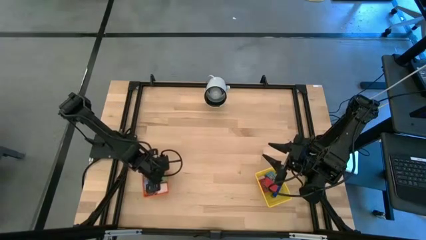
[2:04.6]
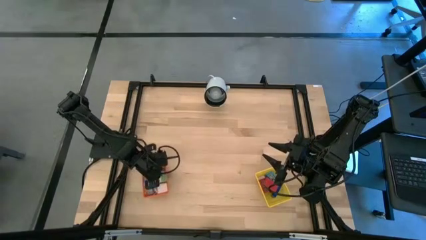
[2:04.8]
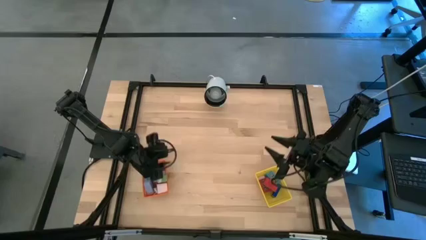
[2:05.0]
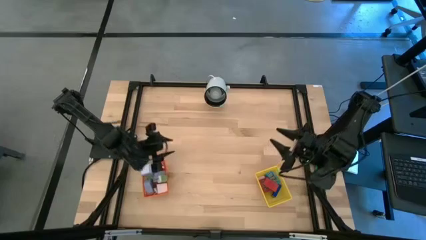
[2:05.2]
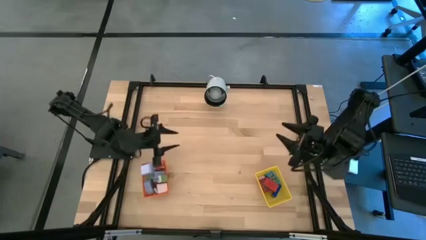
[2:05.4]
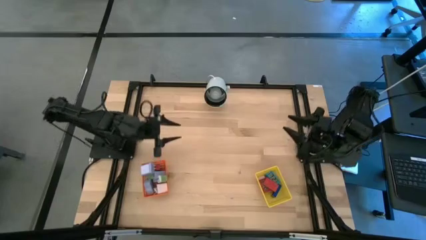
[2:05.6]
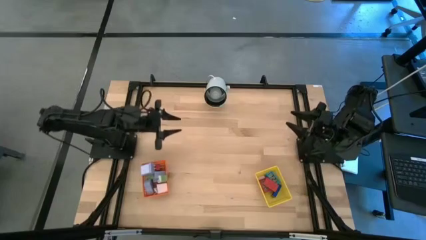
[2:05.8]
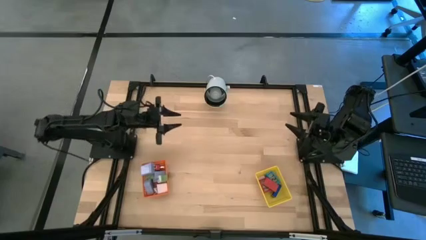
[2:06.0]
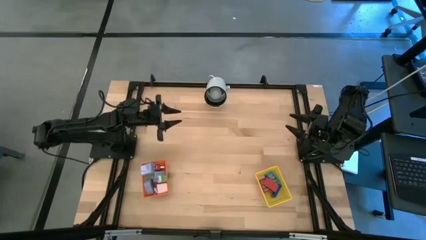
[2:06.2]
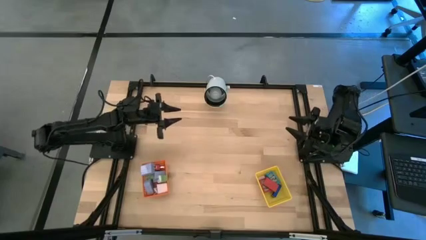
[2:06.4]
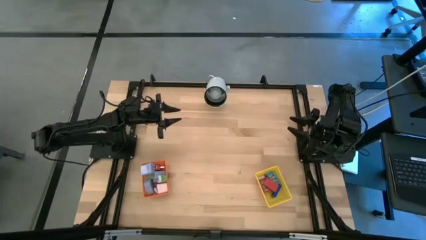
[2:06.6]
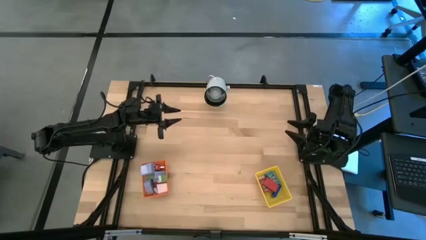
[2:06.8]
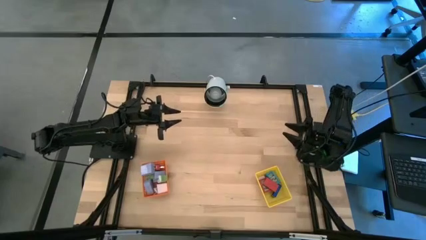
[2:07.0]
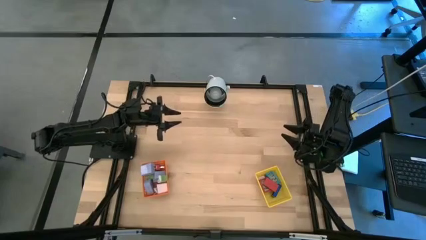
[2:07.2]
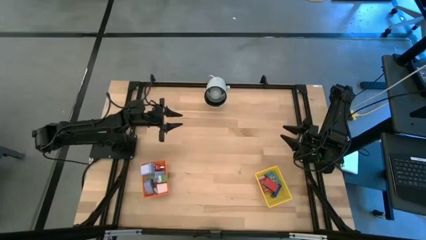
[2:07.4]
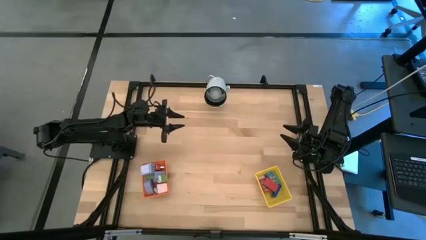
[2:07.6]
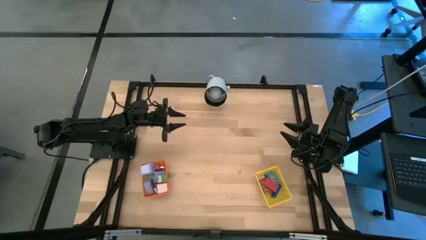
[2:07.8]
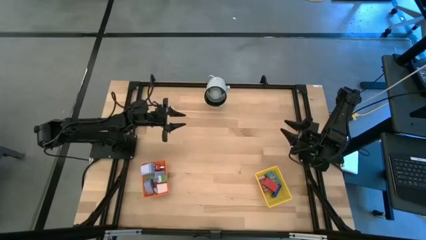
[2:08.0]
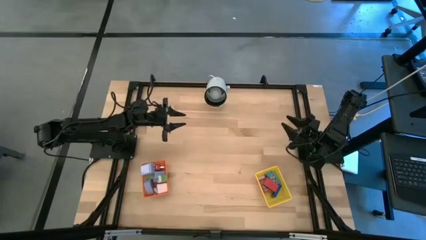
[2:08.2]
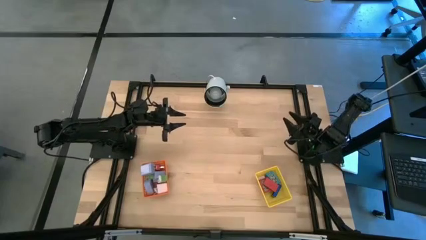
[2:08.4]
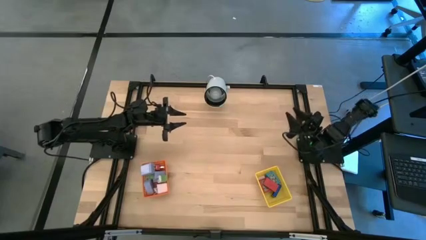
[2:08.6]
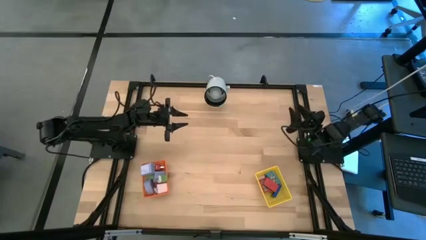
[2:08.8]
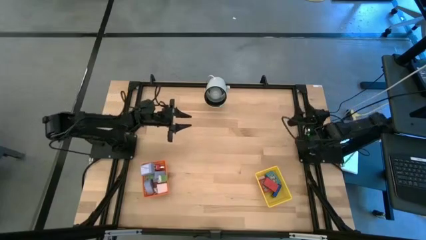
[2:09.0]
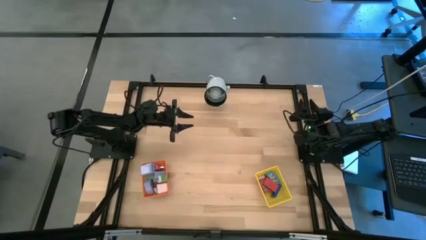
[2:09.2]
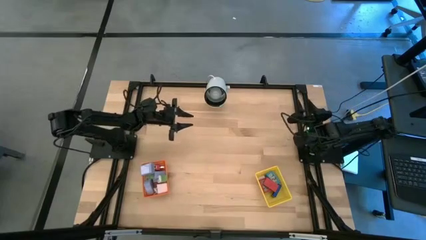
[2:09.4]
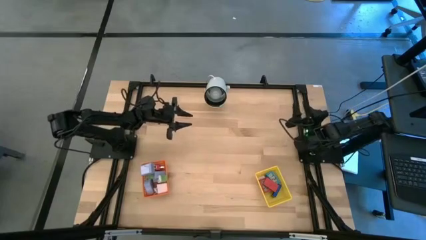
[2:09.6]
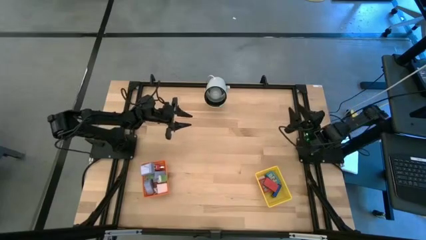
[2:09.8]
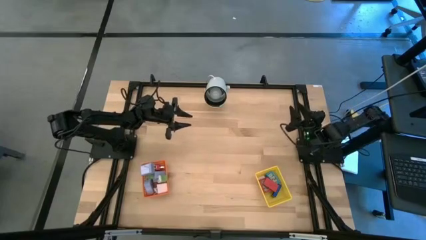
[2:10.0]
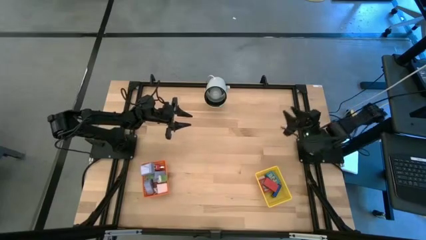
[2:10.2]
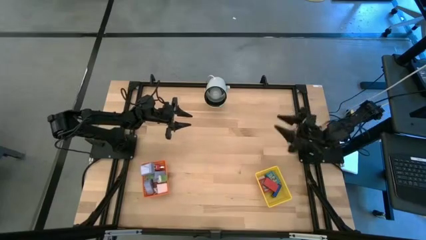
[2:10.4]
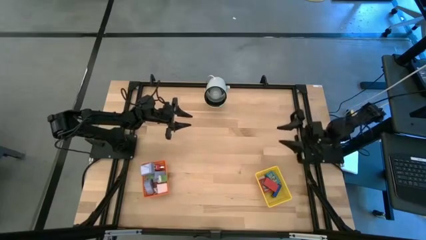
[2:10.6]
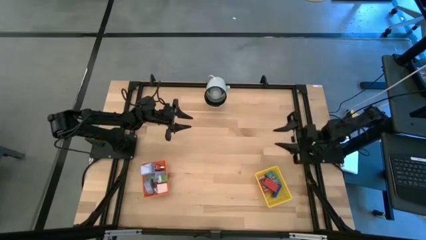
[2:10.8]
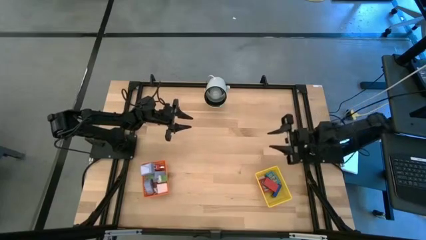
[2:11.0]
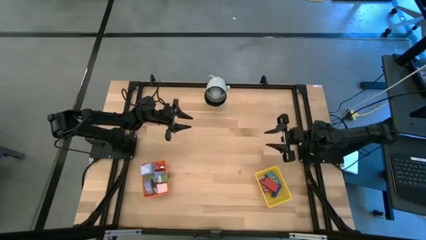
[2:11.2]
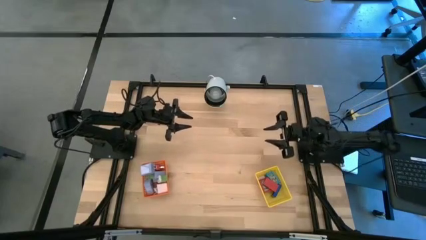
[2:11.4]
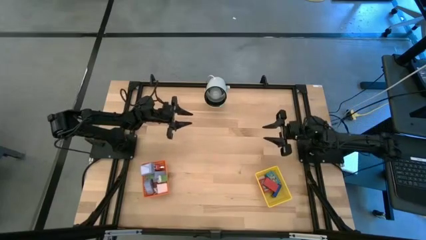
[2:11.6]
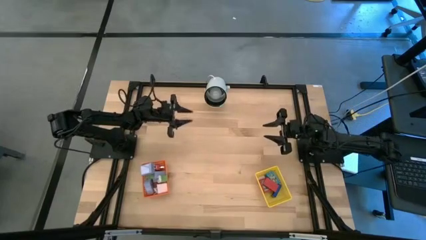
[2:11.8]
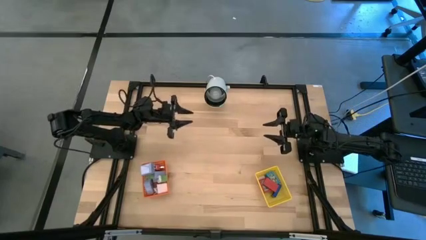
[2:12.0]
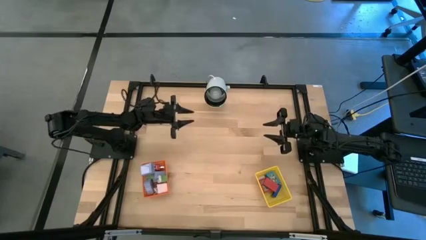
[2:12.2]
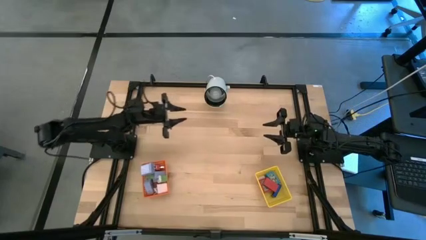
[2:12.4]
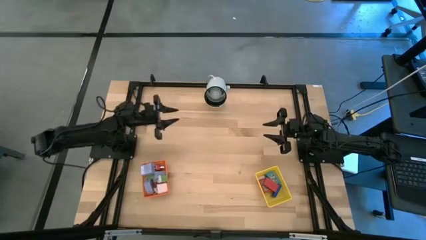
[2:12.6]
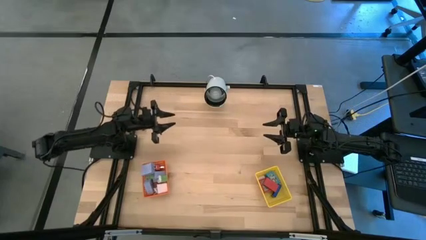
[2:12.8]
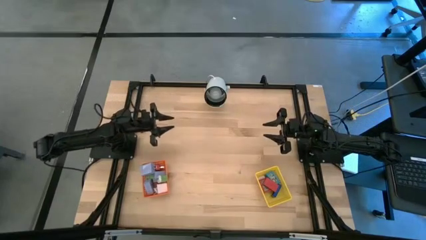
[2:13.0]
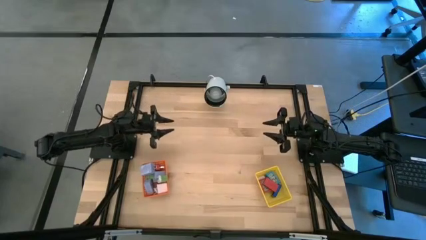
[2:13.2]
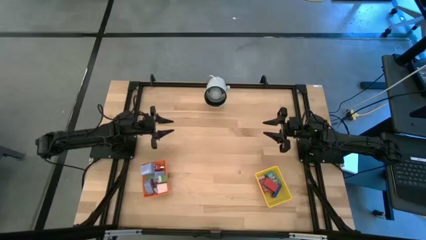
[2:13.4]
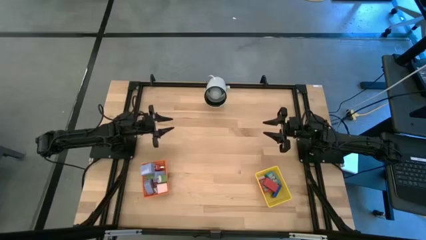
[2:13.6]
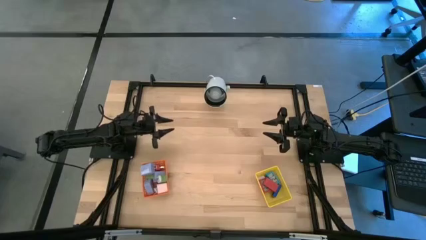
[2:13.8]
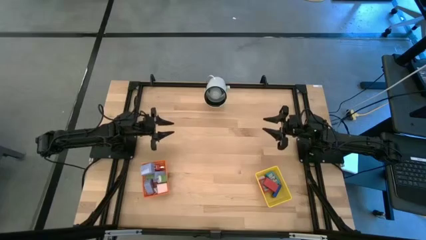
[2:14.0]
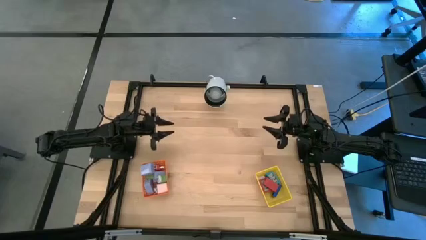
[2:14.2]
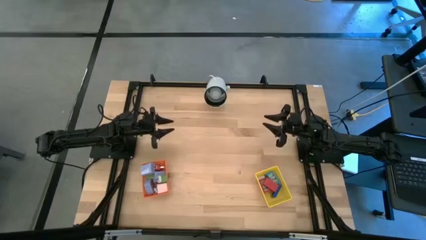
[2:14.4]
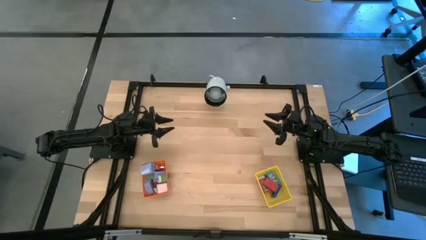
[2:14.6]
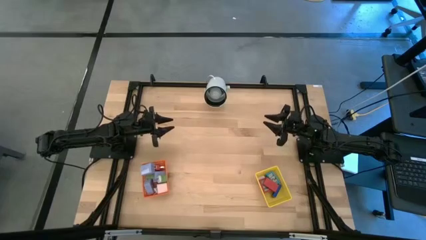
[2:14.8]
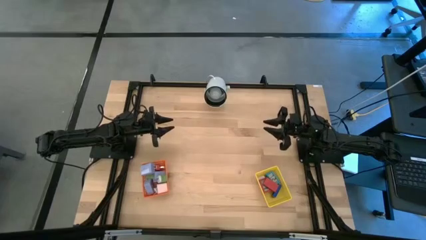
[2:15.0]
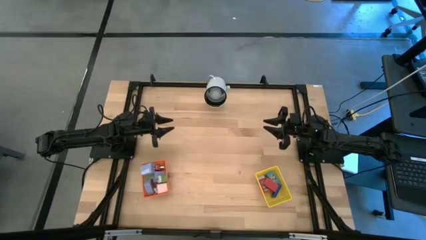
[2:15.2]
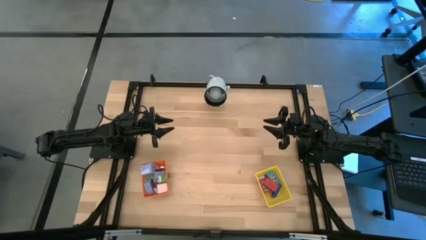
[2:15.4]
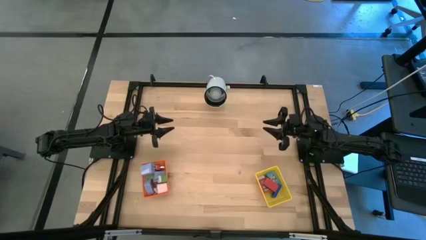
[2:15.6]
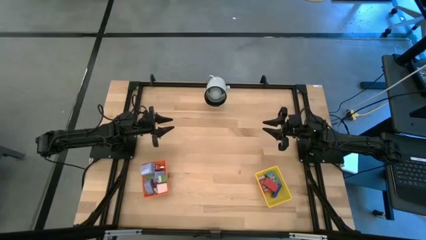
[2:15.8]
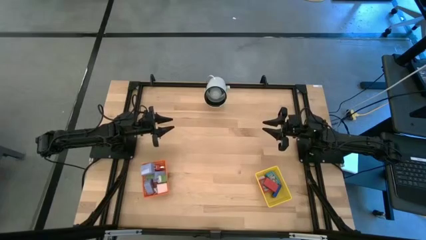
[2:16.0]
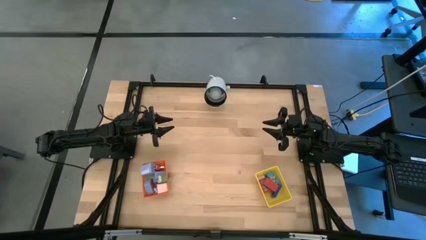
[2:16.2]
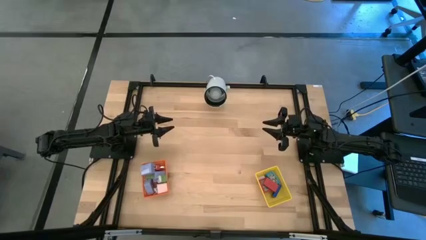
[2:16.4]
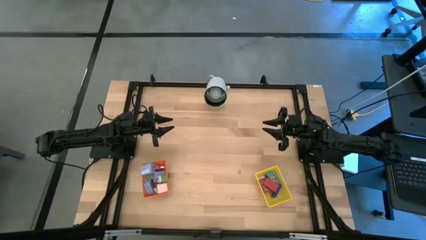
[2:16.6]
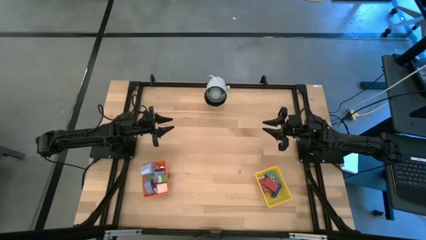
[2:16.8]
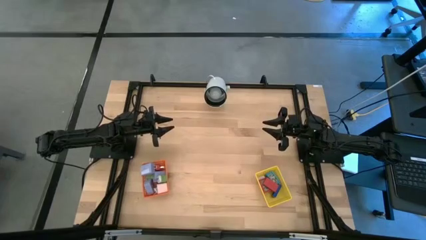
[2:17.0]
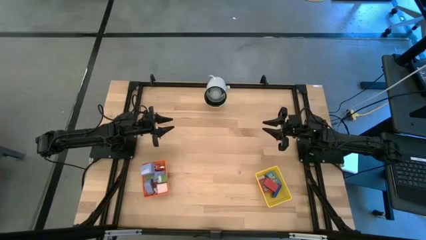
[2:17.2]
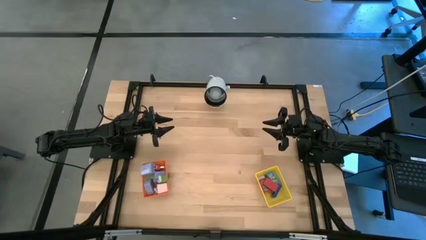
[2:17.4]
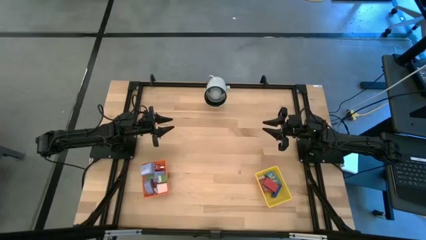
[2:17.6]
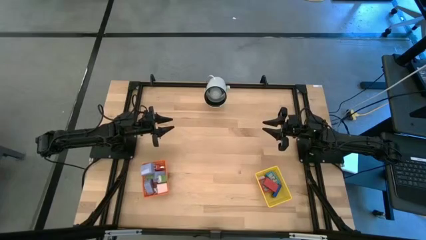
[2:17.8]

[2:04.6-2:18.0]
Task: Pick & Place Office items
Return to Home Position

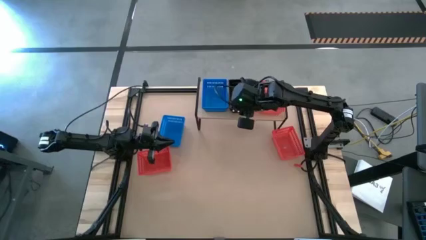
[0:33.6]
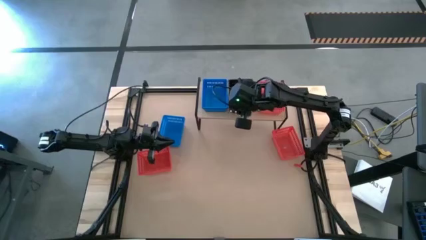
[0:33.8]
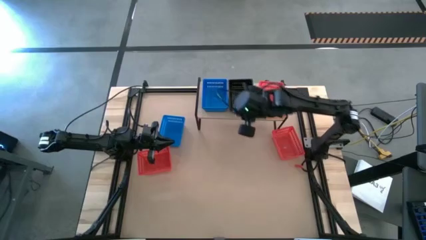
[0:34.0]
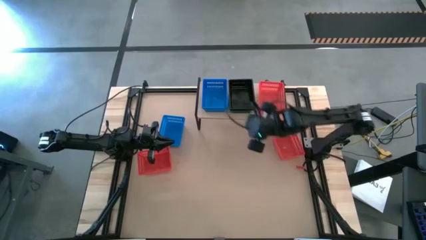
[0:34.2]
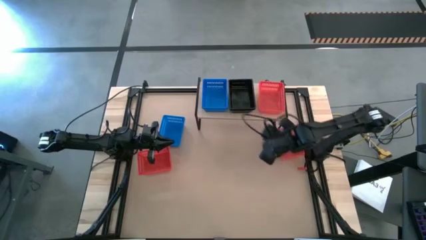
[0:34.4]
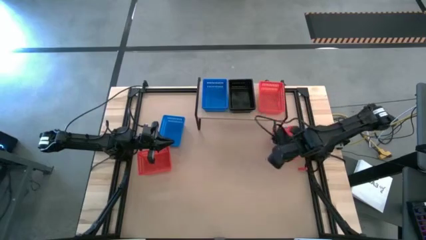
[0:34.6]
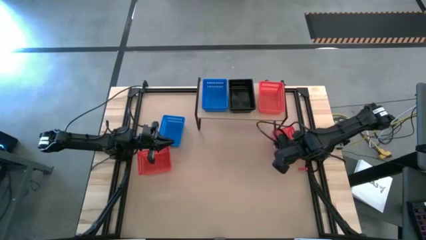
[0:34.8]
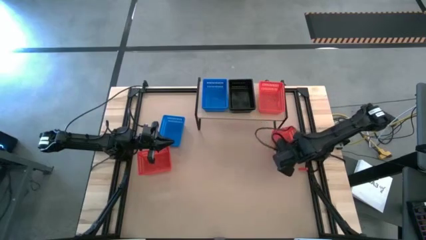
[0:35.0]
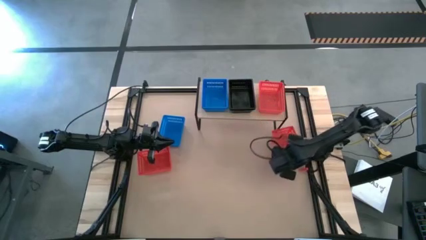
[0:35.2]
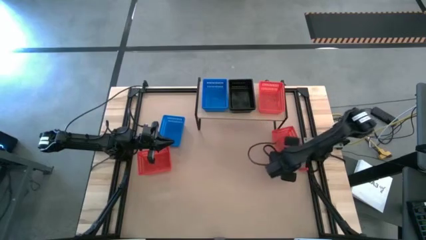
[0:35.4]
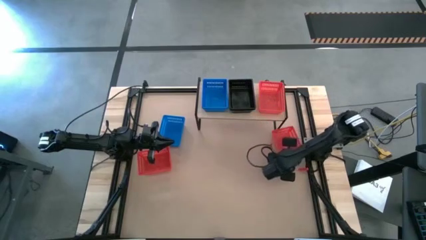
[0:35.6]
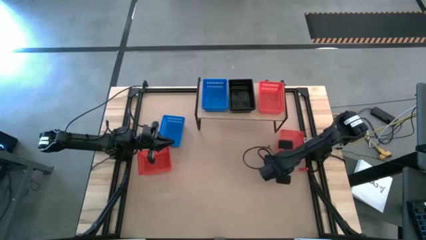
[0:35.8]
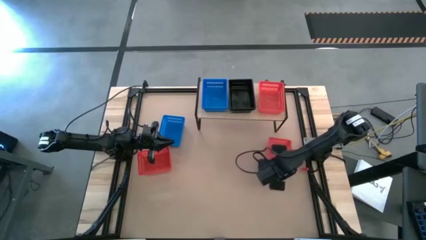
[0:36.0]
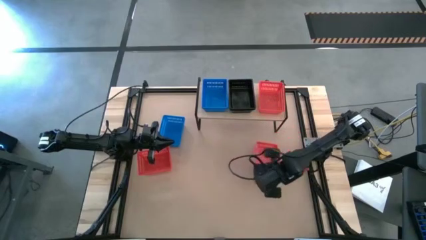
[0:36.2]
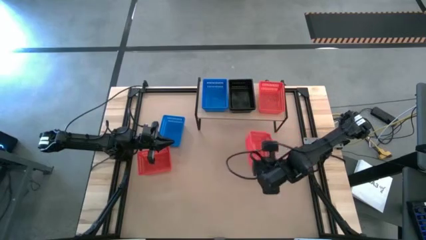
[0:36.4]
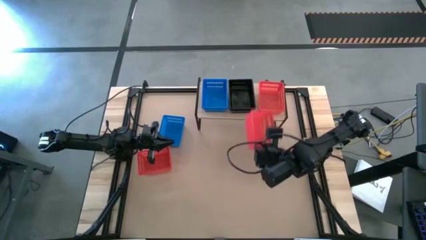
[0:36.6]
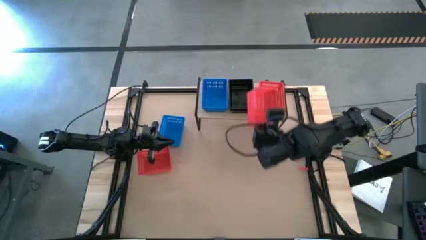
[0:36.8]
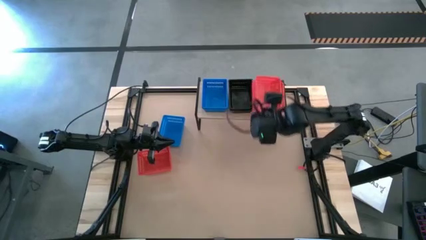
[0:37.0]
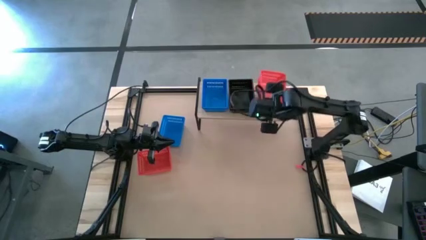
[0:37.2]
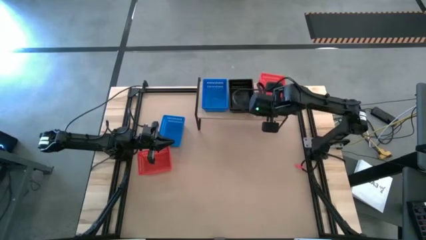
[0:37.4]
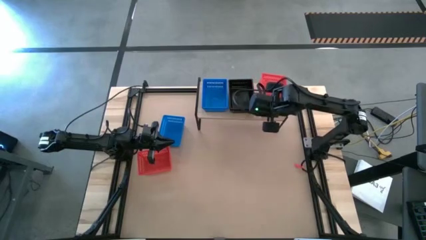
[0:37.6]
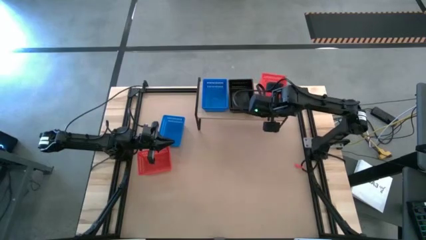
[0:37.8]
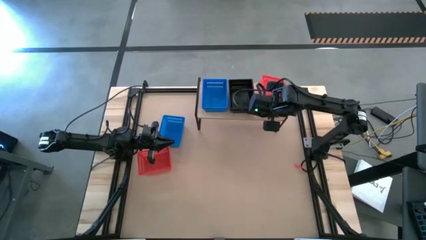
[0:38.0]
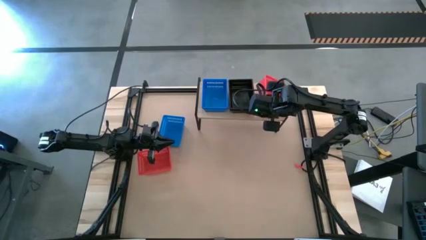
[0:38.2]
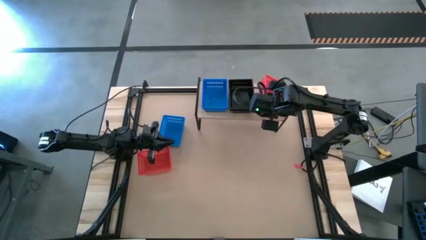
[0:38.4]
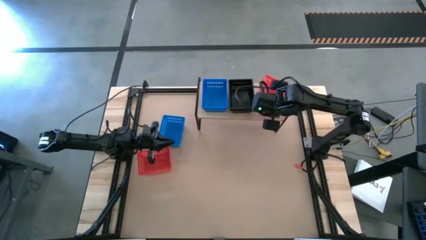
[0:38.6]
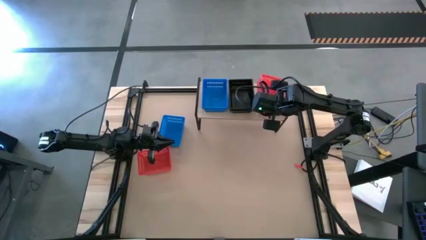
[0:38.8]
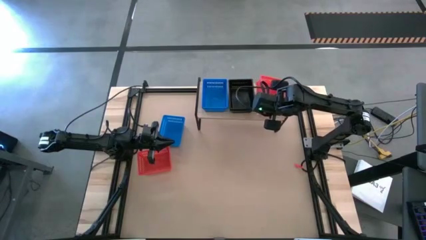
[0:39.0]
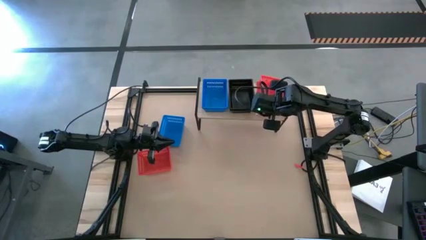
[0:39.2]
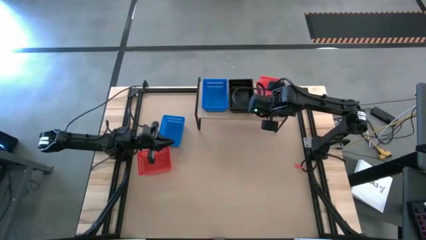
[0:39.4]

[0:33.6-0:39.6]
Task: Stack baskets on shelf by color
Stack the right red basket on top of the red basket on the shelf
